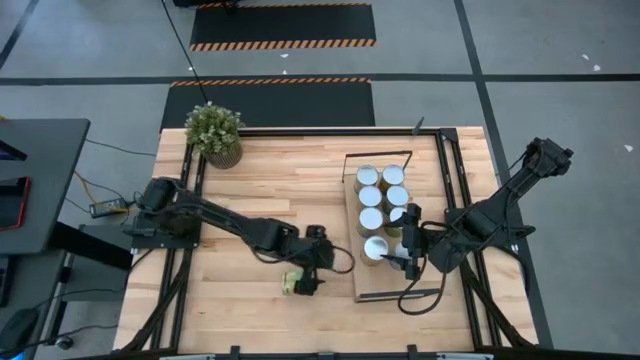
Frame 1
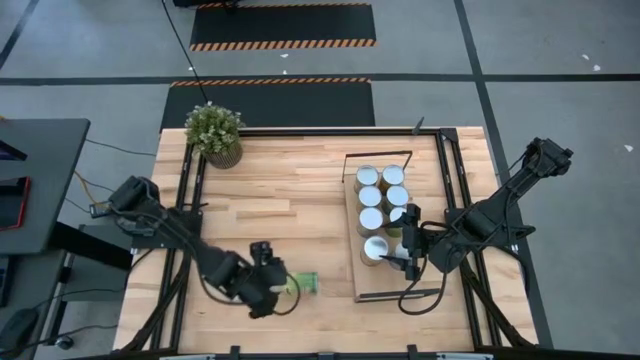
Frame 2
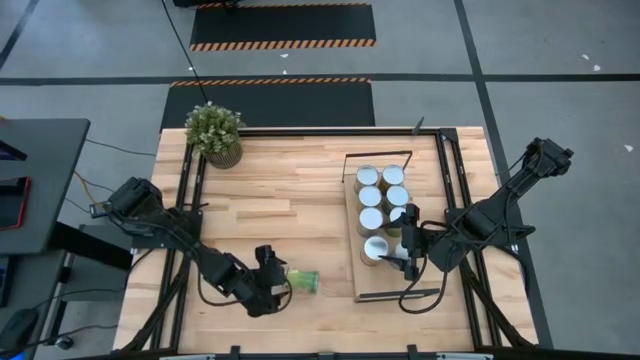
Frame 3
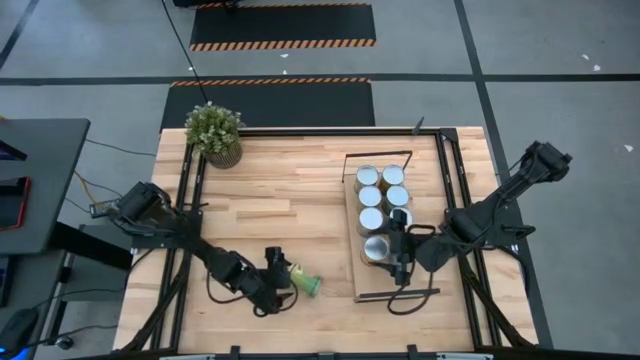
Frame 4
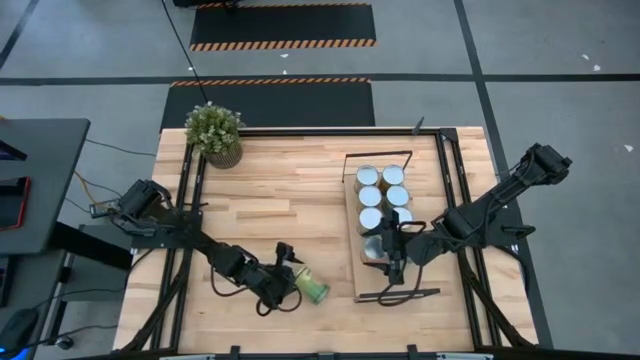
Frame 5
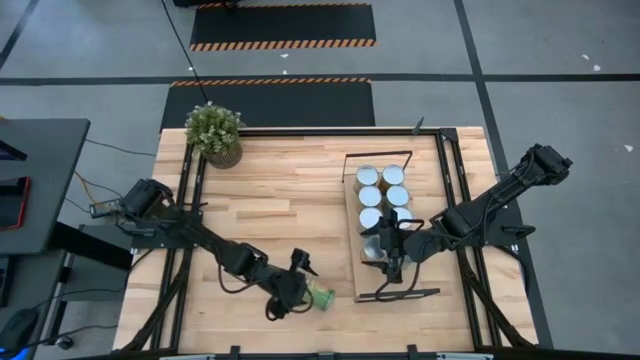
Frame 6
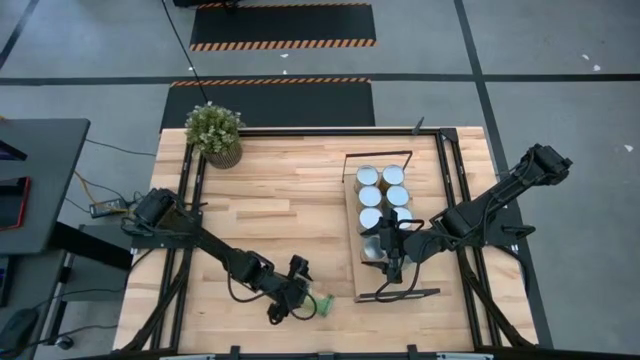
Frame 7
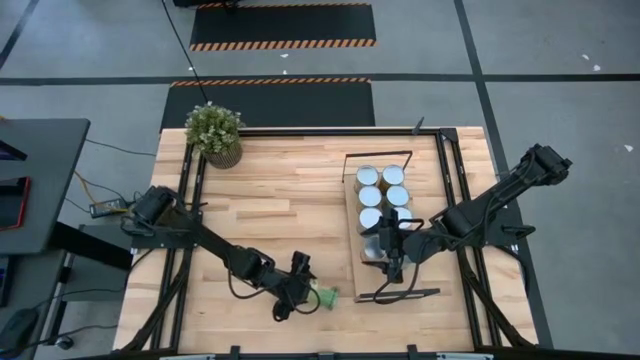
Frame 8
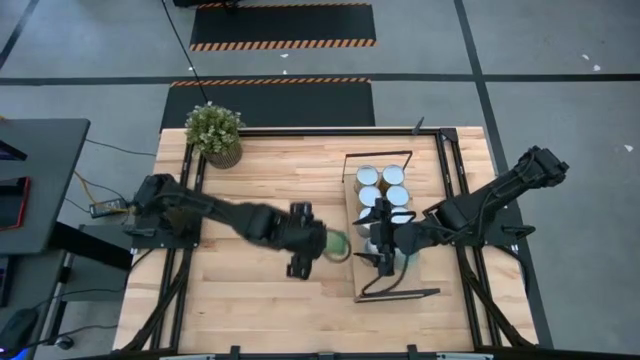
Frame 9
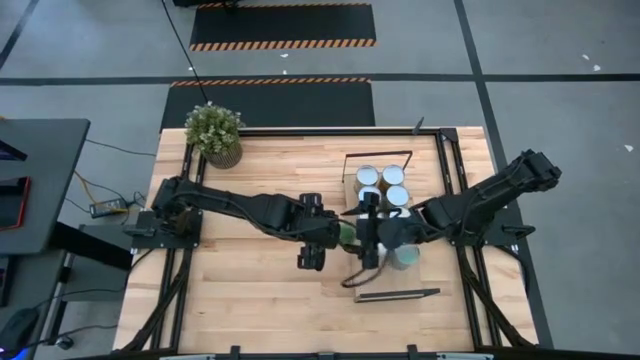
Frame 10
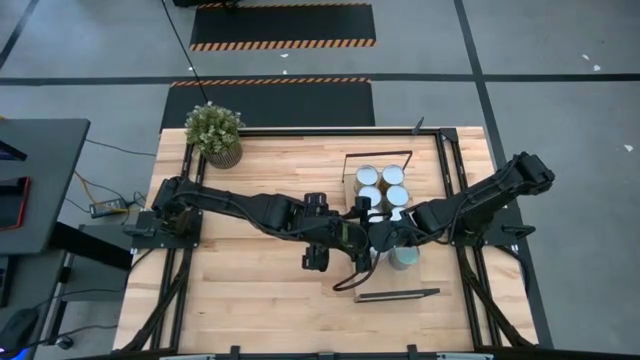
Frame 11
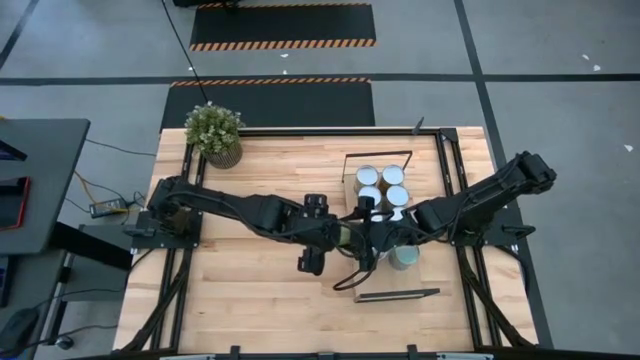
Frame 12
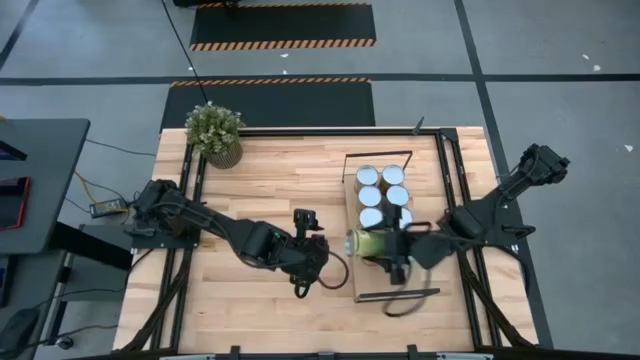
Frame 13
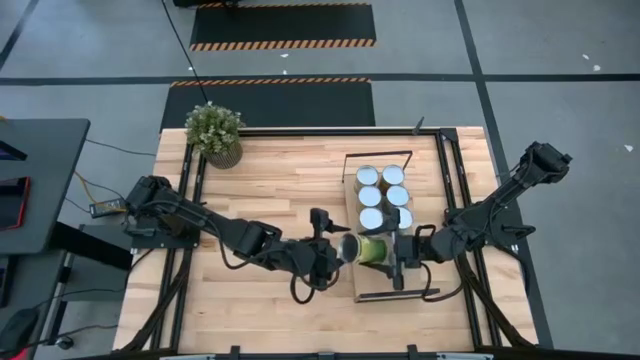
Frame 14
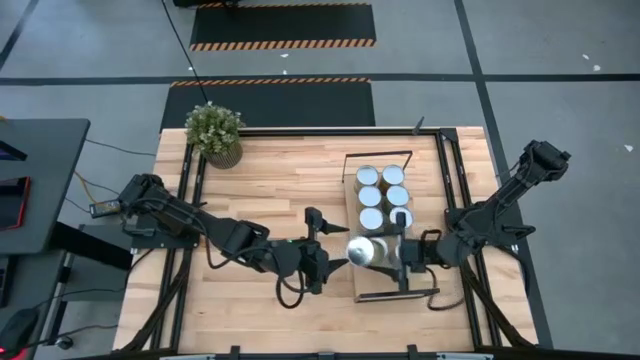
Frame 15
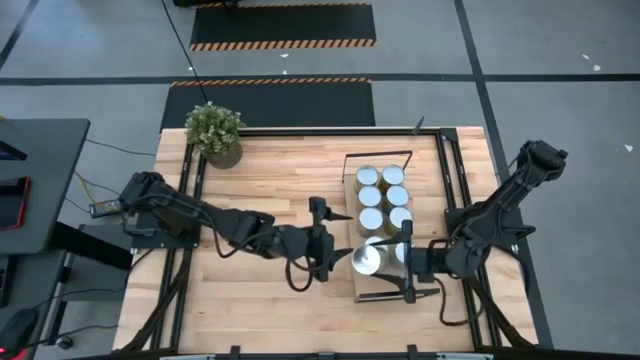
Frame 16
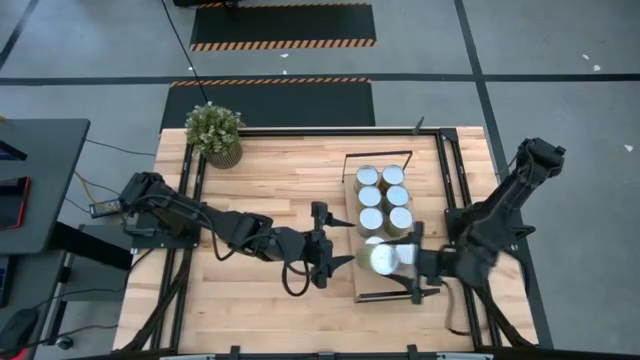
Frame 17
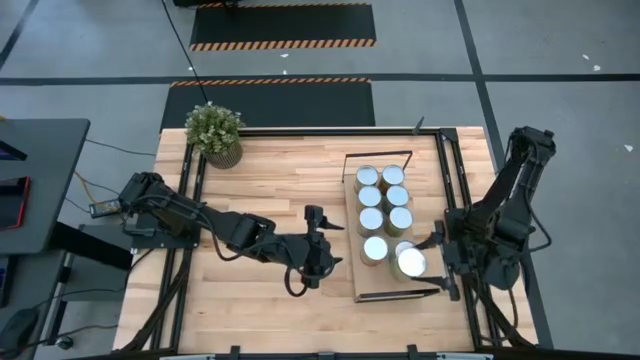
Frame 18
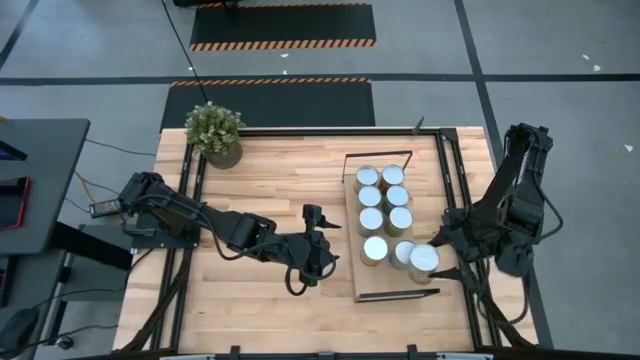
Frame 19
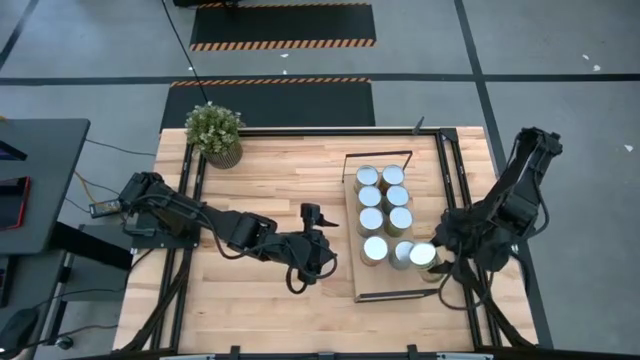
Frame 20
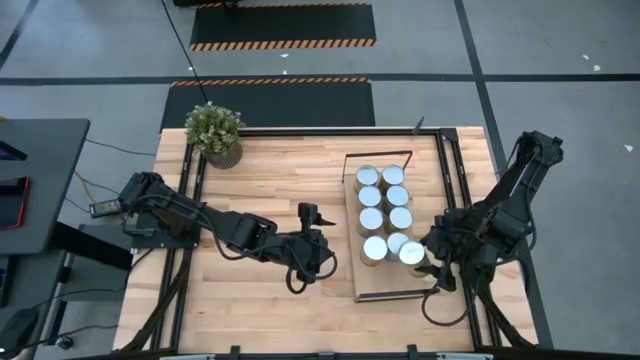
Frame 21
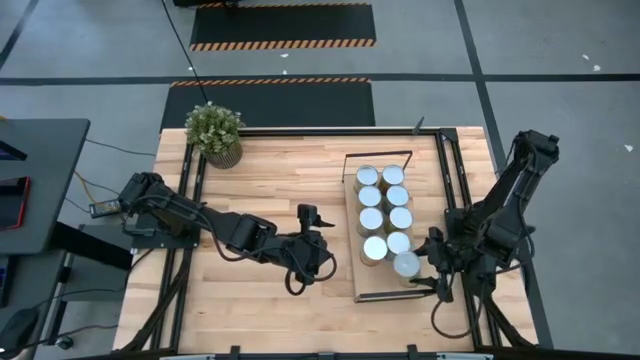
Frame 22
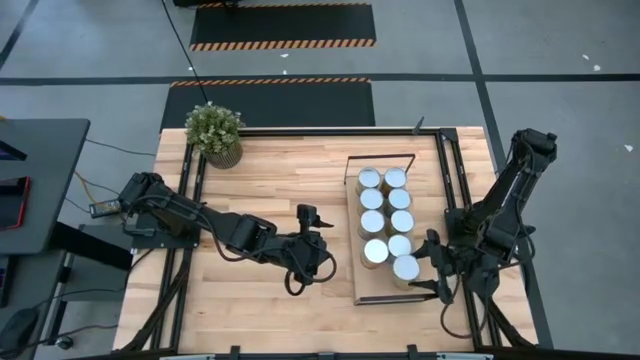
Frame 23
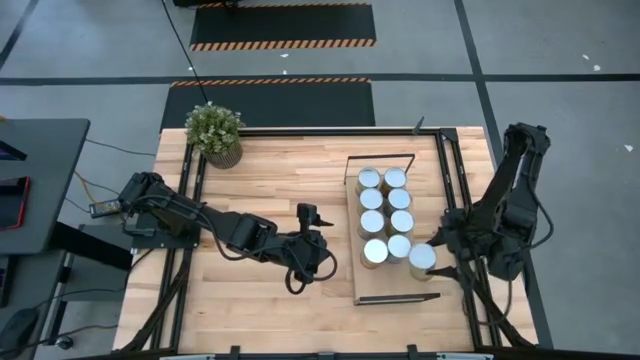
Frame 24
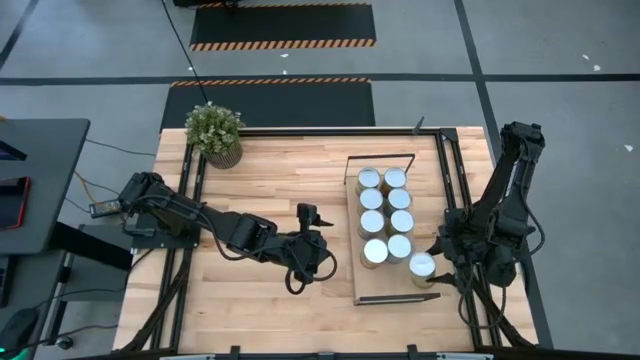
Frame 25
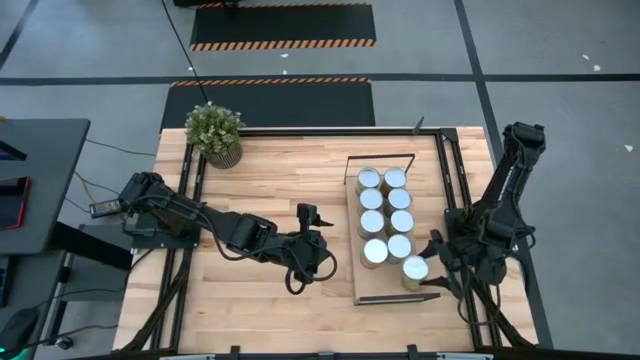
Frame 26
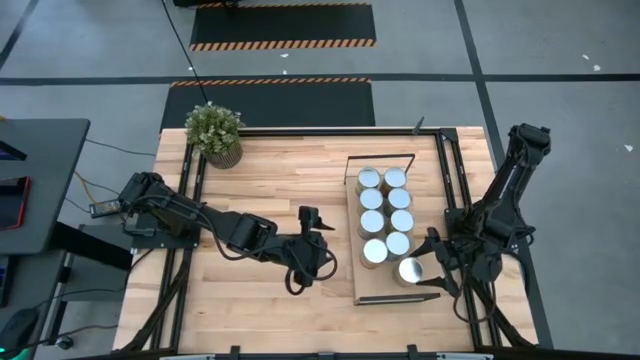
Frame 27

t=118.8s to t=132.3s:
Task: Pick and place cans onto a shelf
Put the canned oranges on the shelf

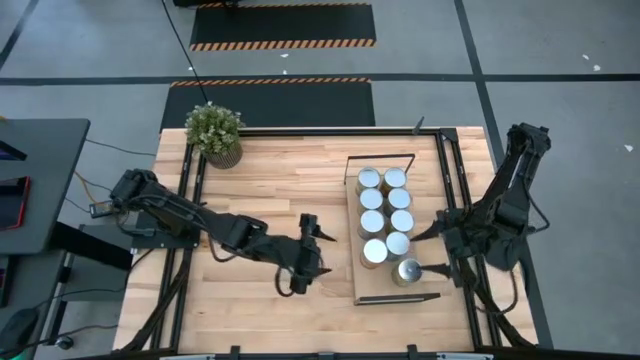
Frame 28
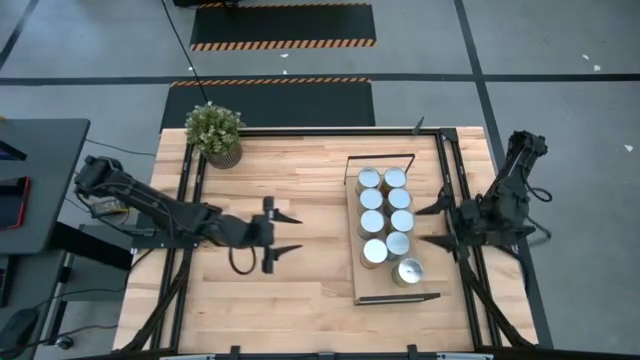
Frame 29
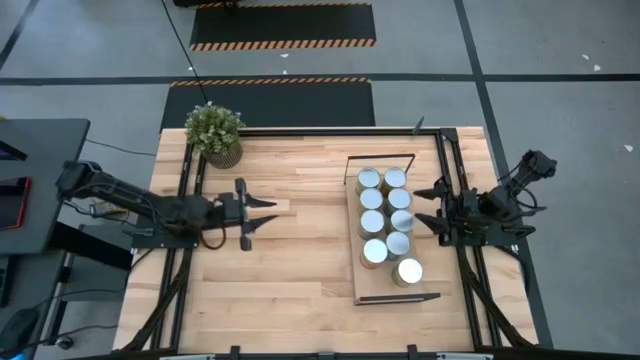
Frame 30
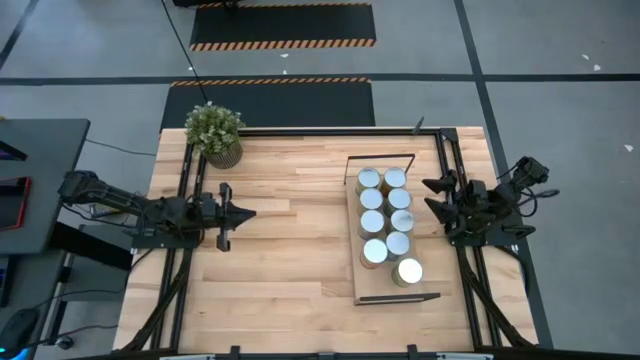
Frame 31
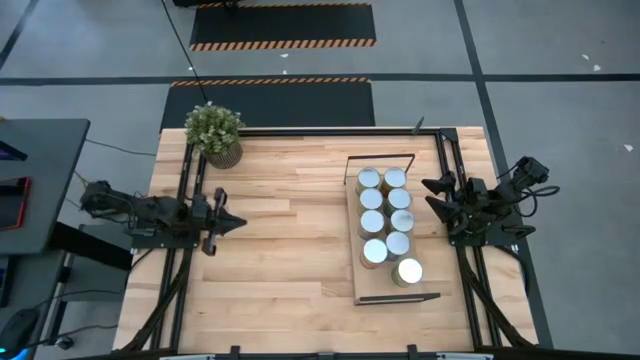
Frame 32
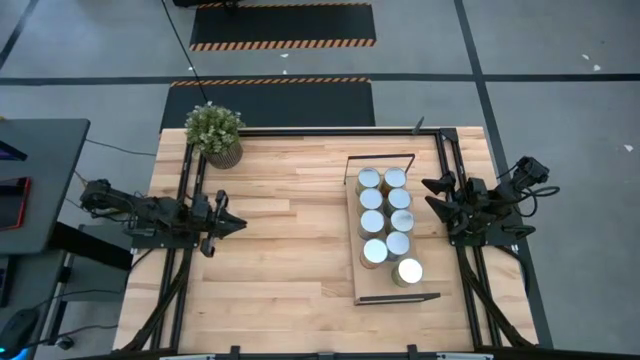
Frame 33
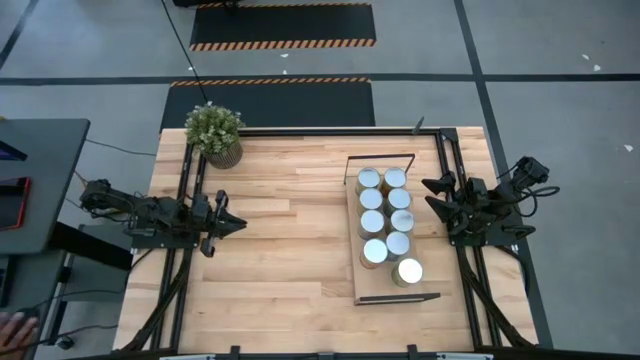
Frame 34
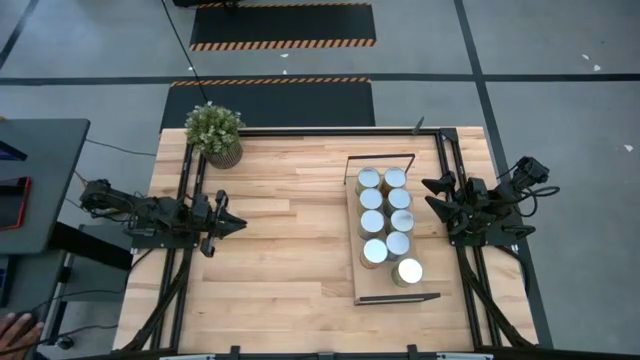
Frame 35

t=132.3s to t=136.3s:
Return to Home Position

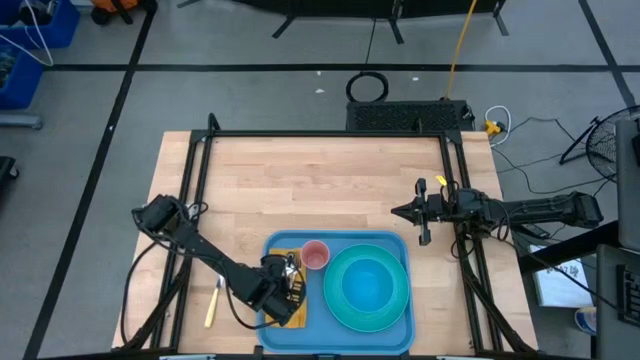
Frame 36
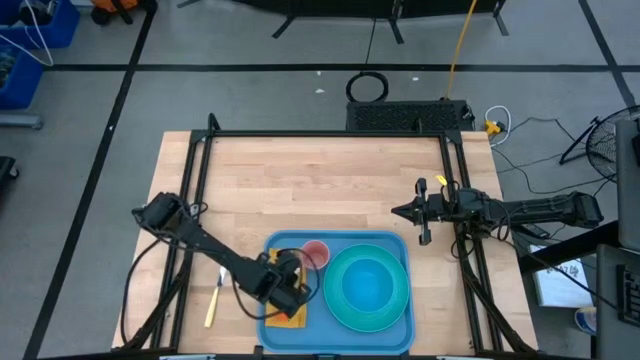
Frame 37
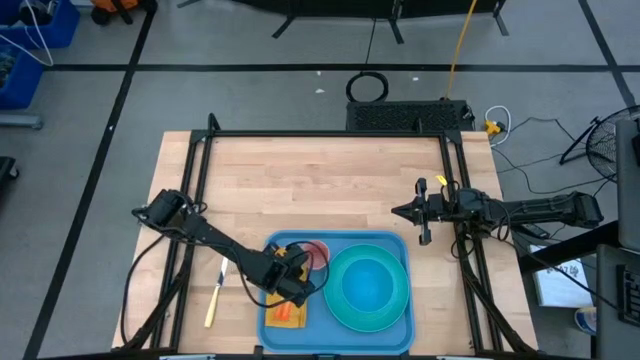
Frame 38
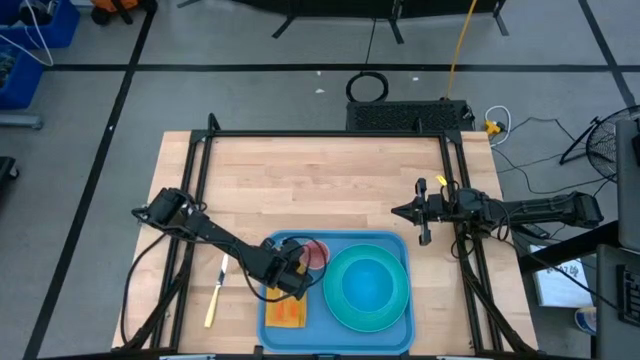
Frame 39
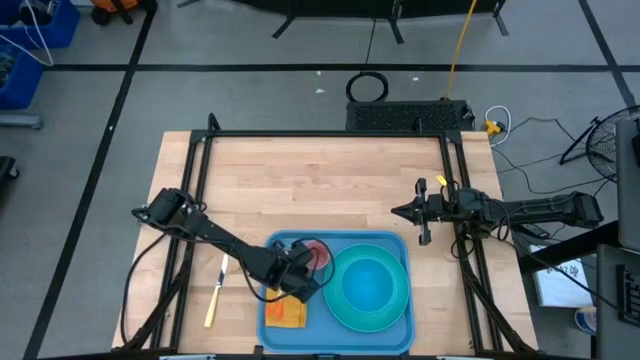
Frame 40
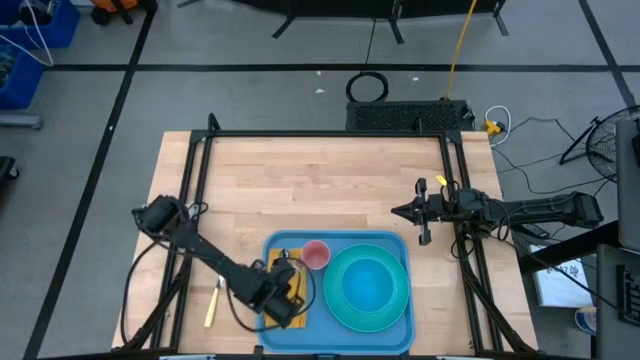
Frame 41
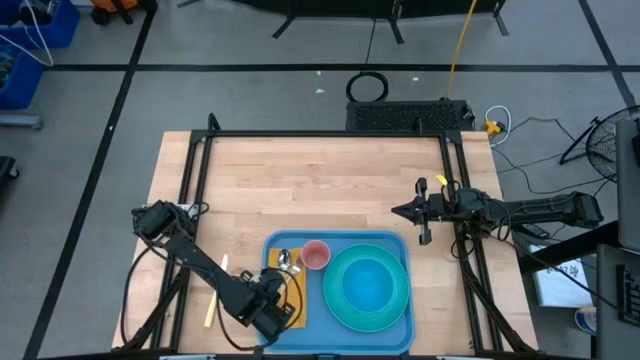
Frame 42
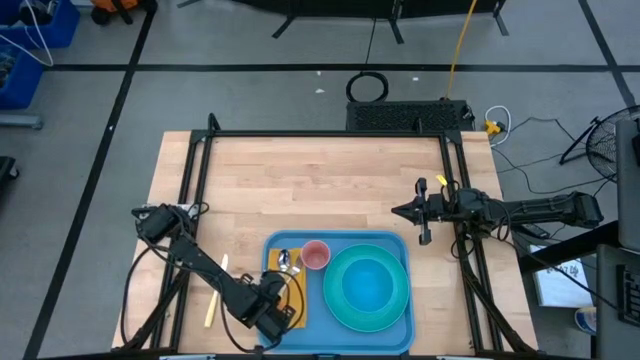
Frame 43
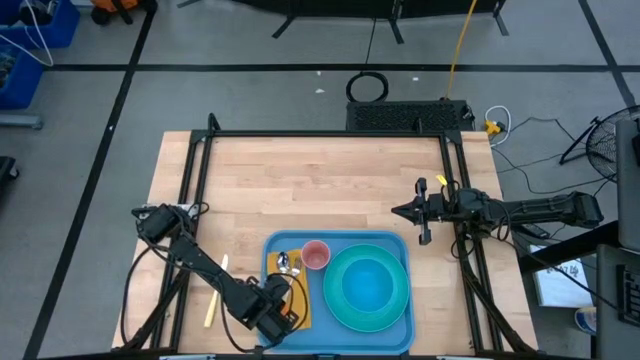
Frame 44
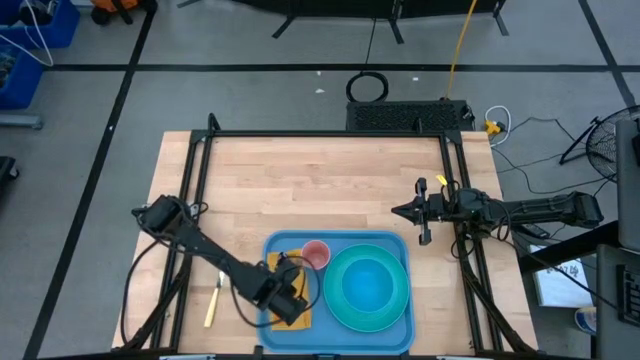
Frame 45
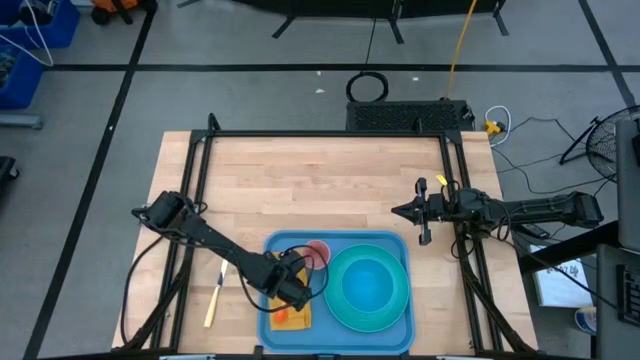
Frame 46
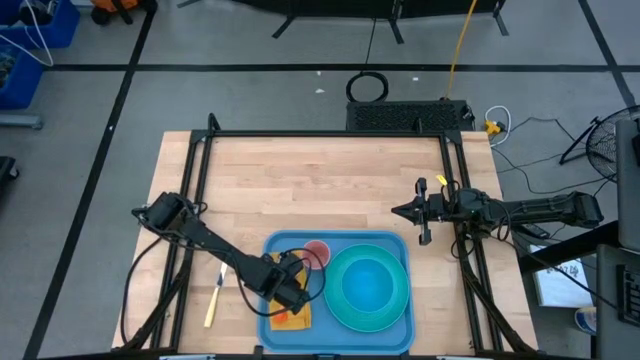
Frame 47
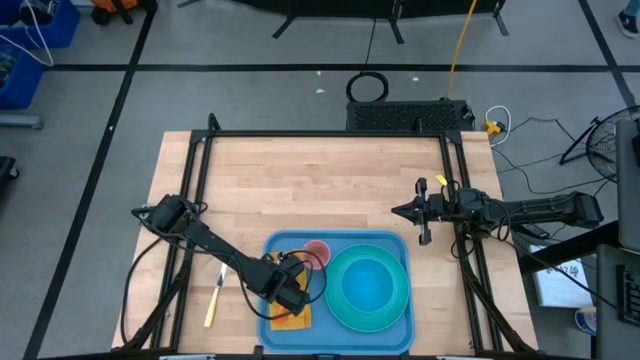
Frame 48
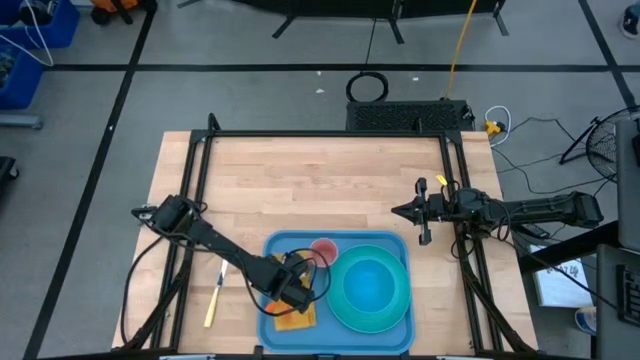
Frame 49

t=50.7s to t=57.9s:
Task: Set up tray
Adjust the orange fork on the yellow table napkin
